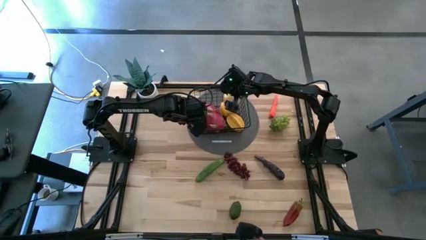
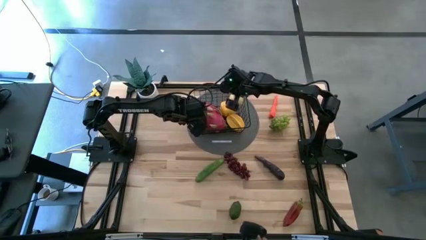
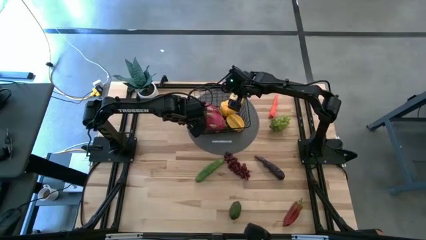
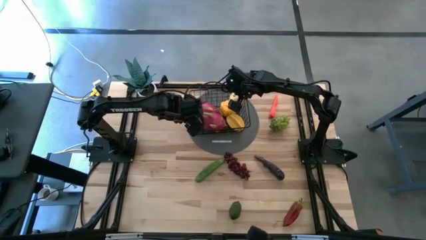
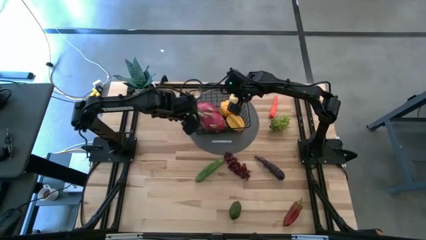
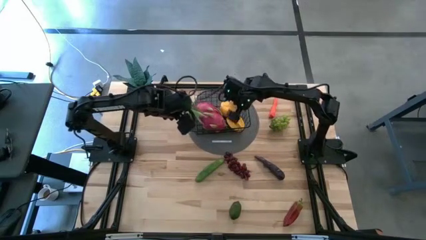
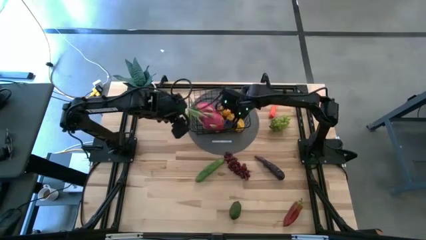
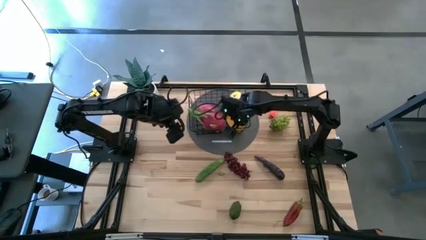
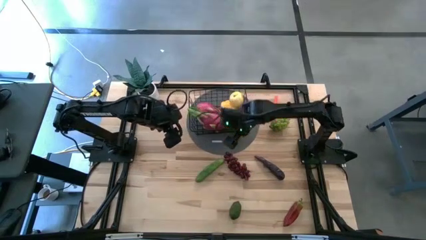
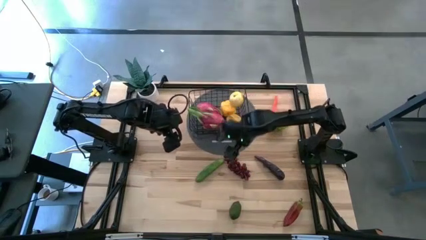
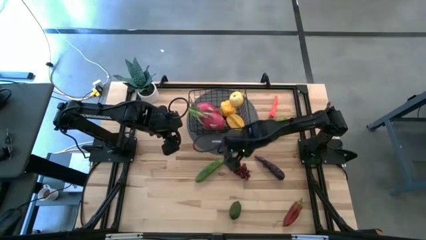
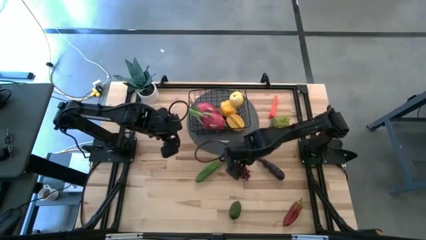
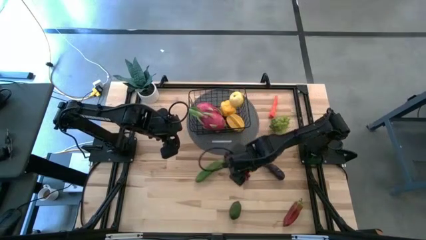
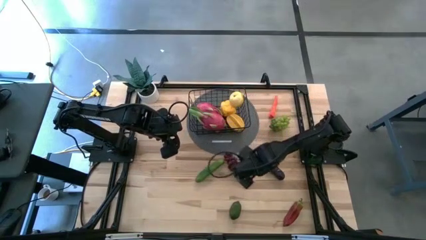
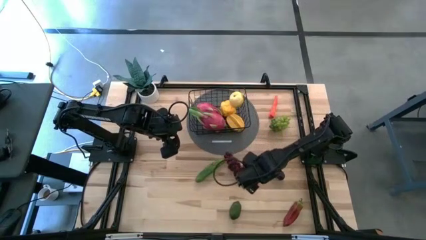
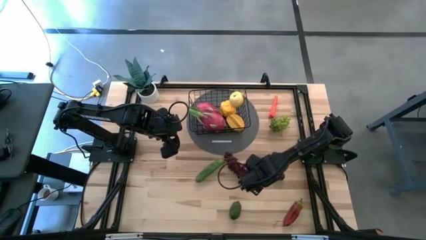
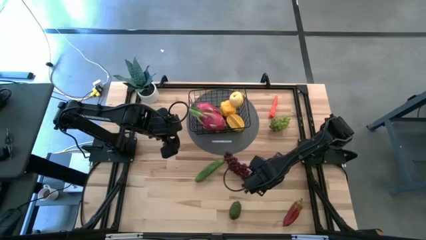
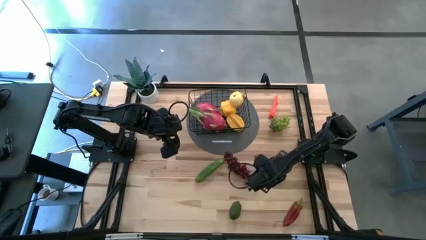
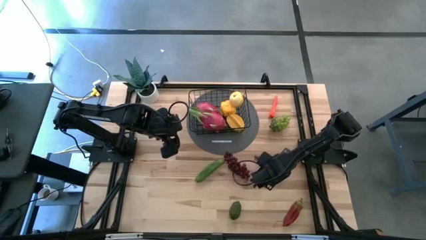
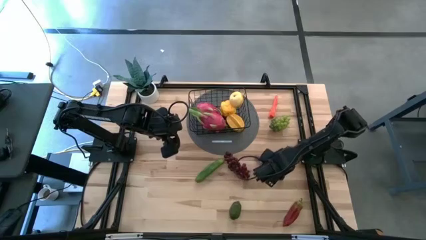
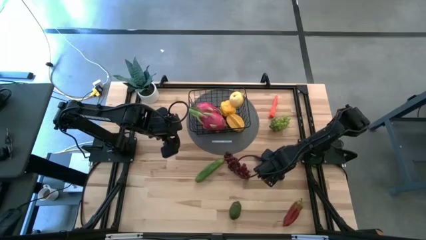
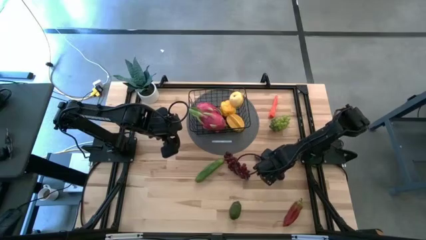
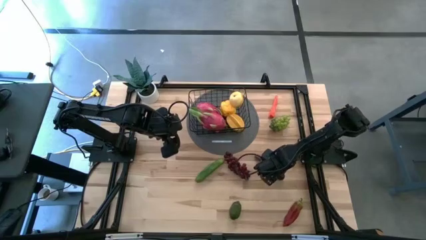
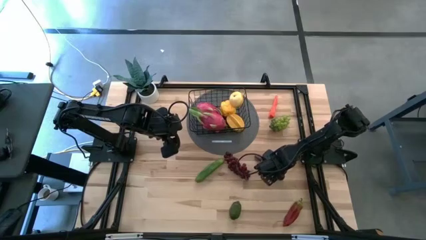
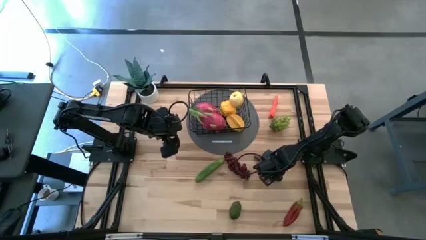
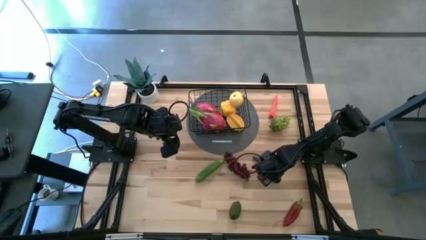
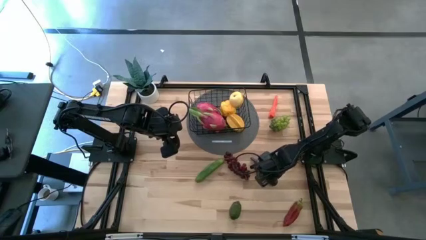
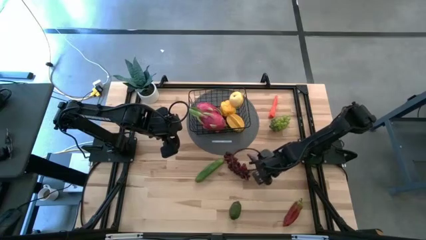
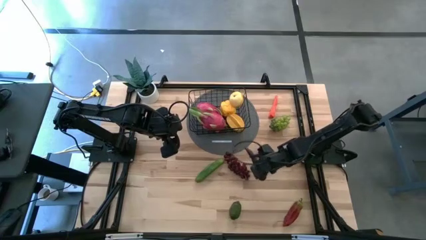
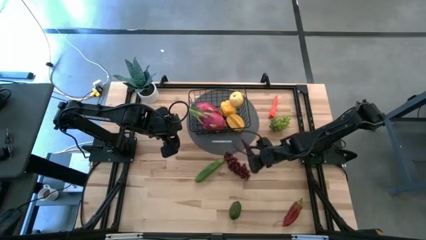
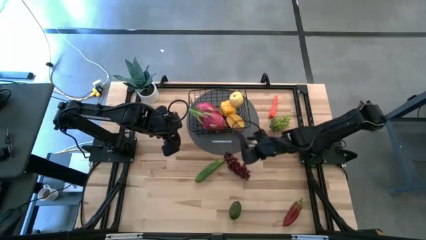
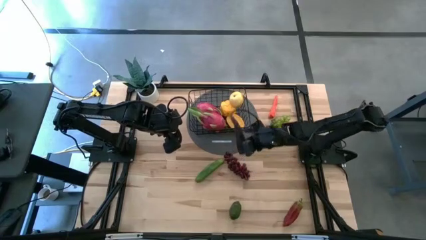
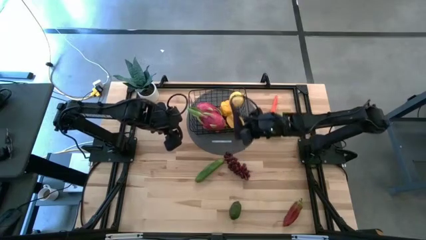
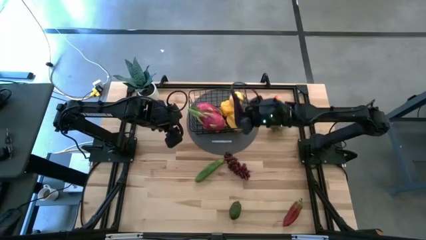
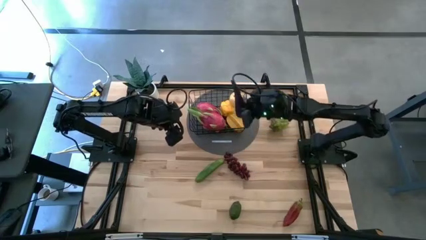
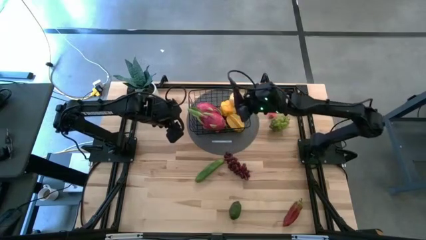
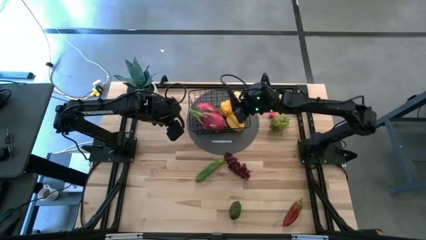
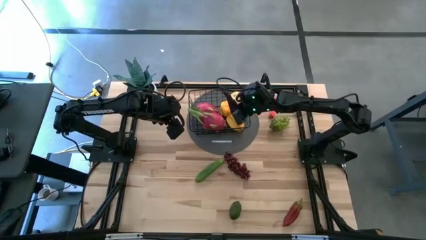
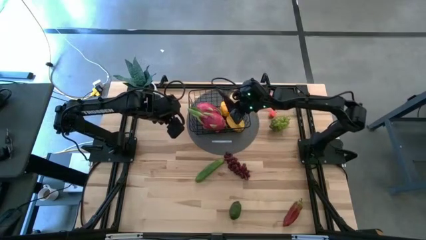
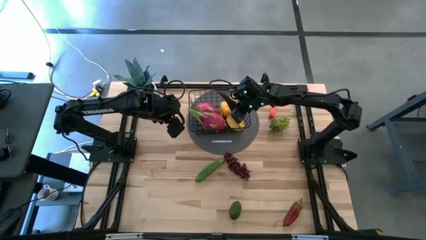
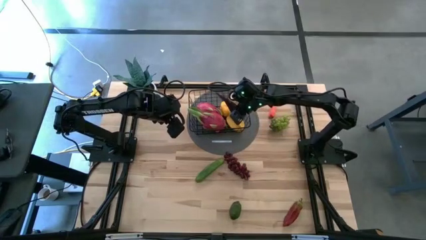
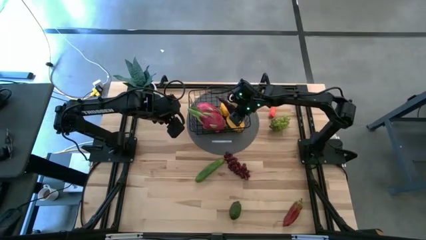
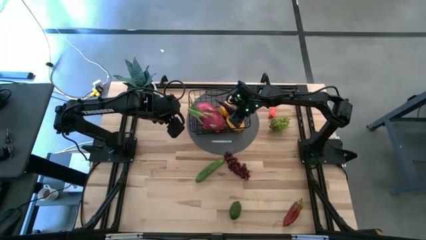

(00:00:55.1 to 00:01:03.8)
Task: Build produce basket
Put the eggplant into the wire basket

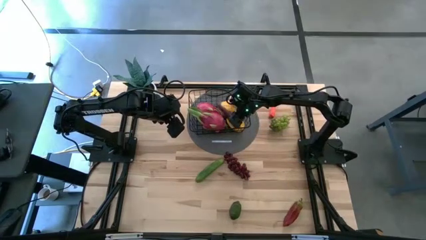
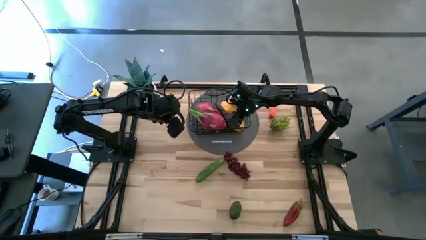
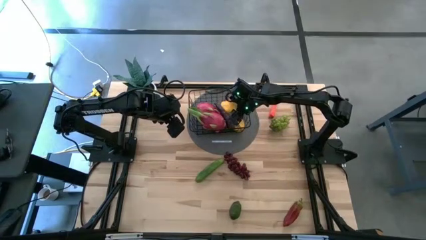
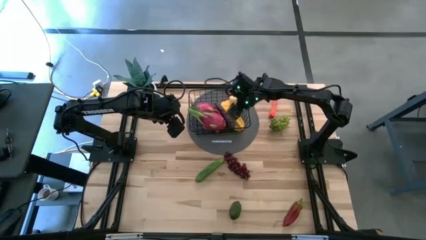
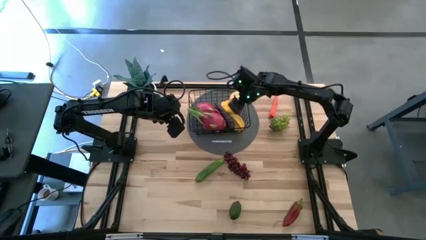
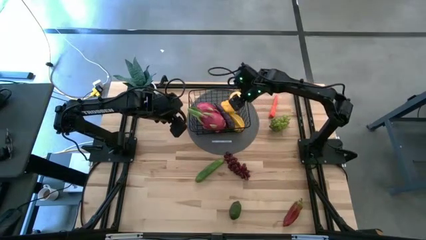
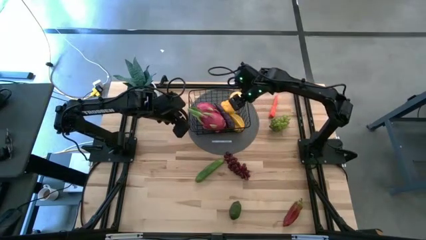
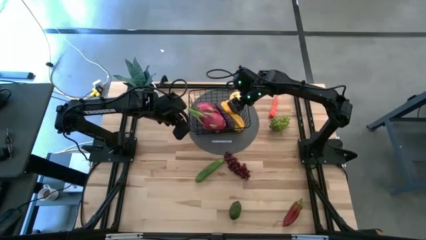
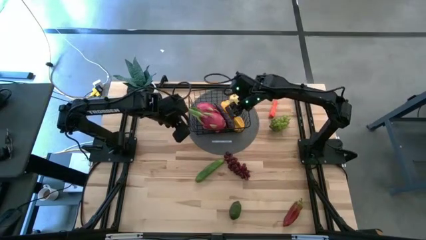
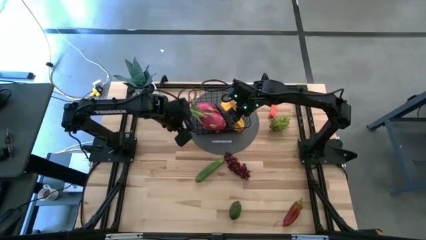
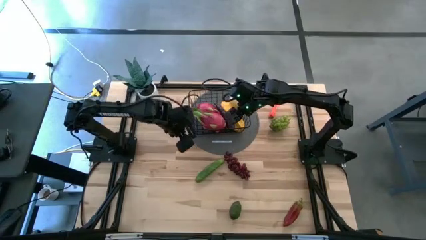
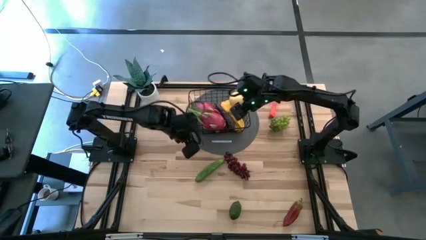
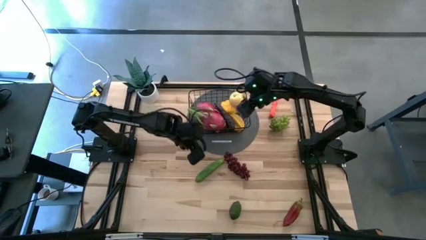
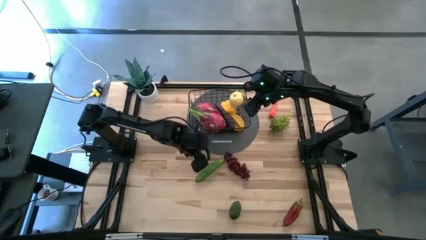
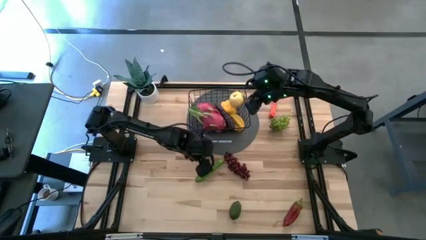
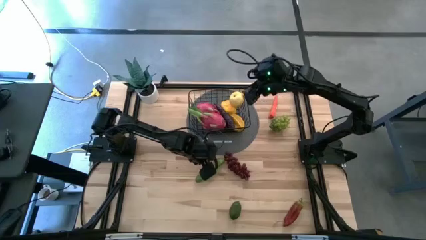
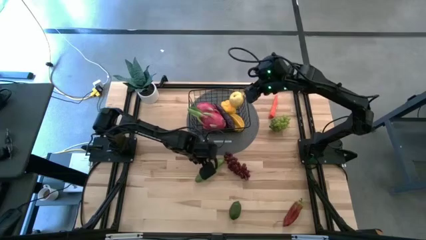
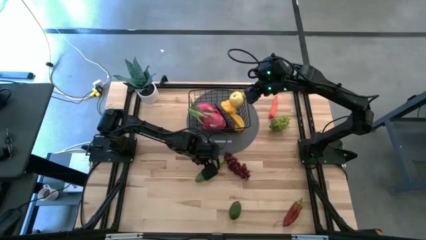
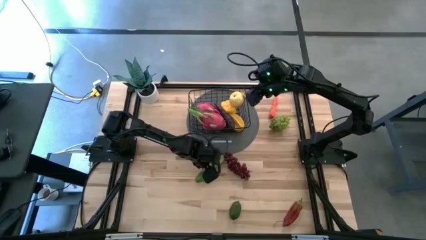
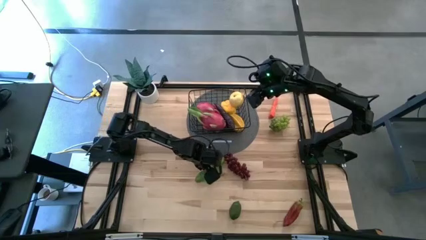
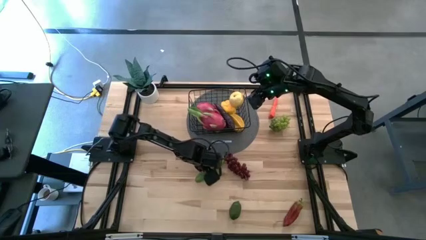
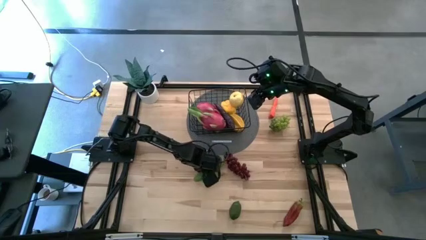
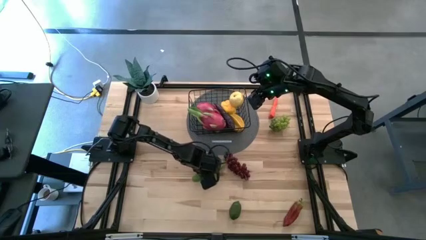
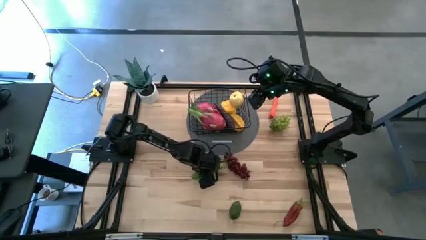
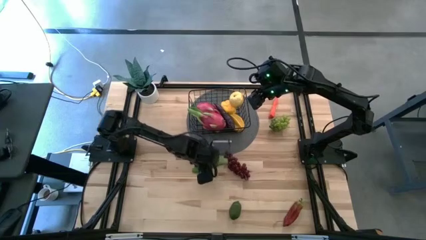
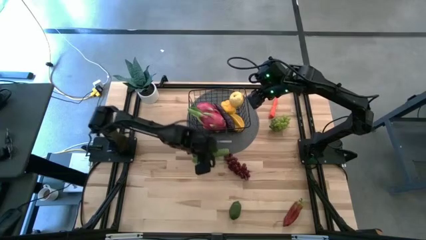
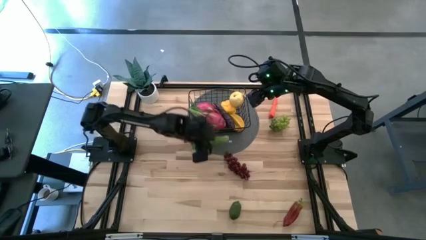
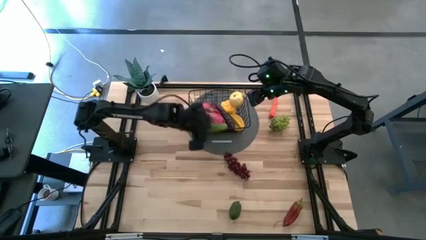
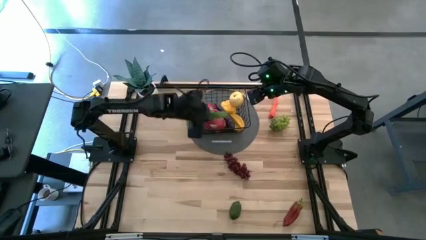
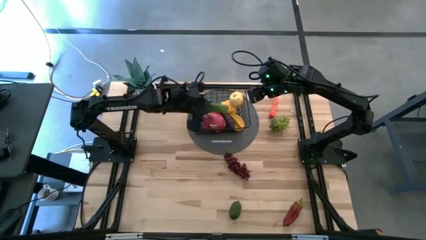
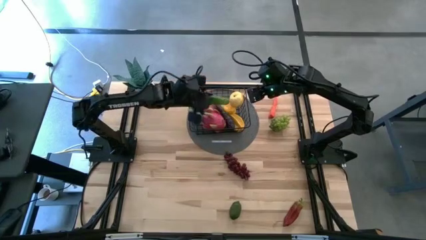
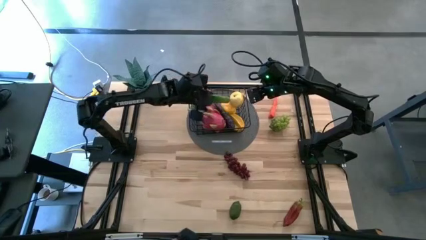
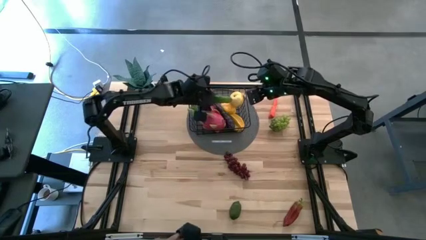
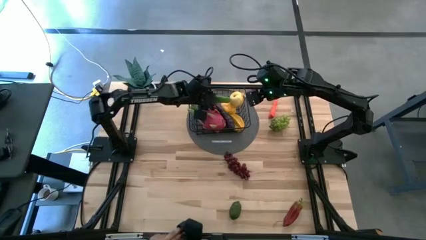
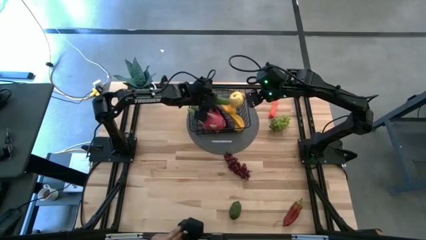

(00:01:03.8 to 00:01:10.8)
Put the cucumber into the wire basket
